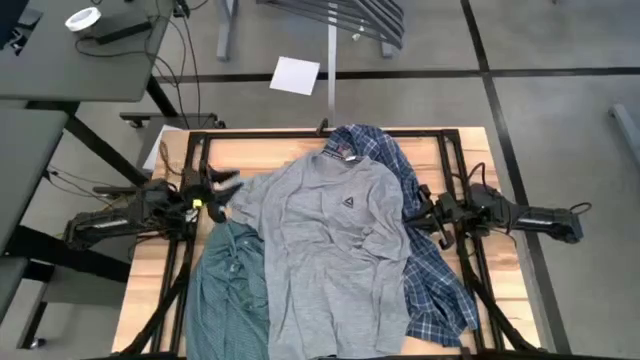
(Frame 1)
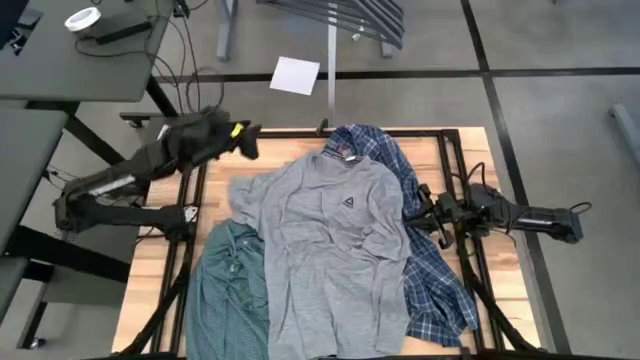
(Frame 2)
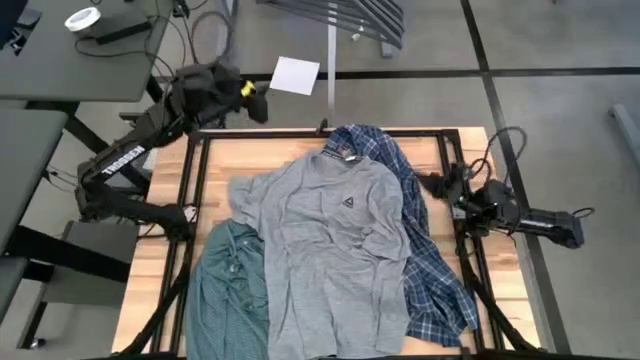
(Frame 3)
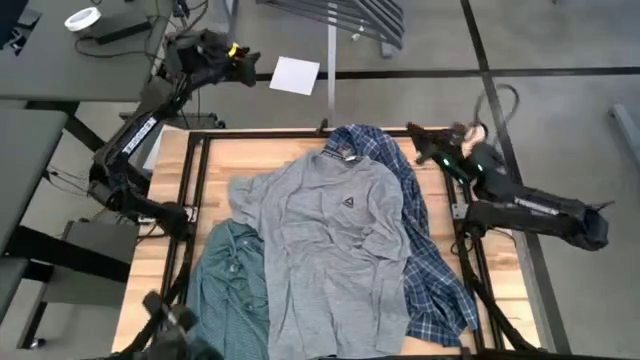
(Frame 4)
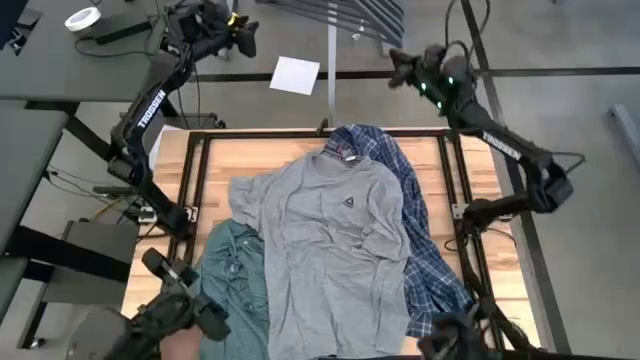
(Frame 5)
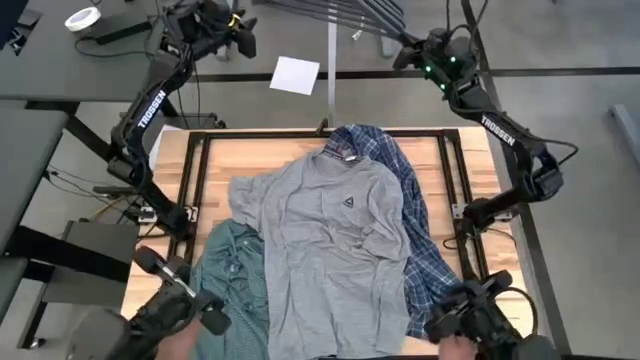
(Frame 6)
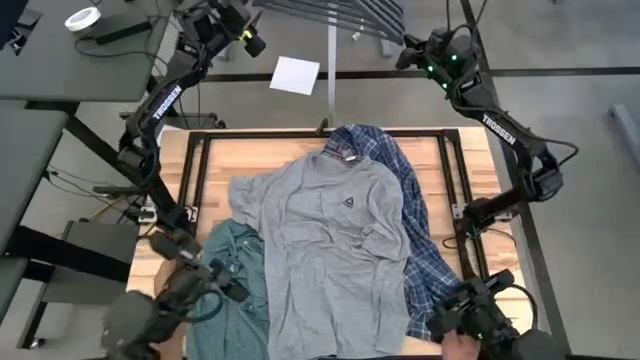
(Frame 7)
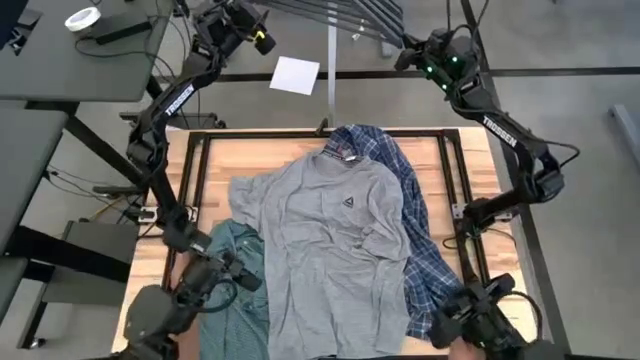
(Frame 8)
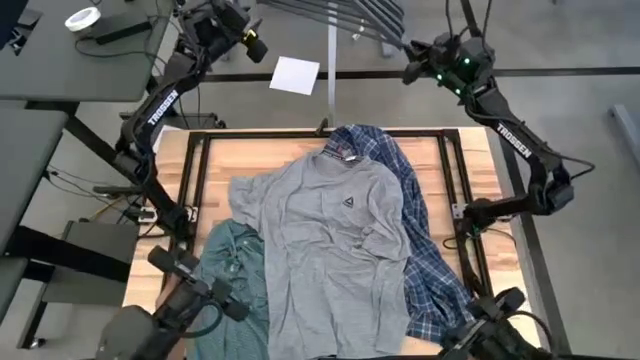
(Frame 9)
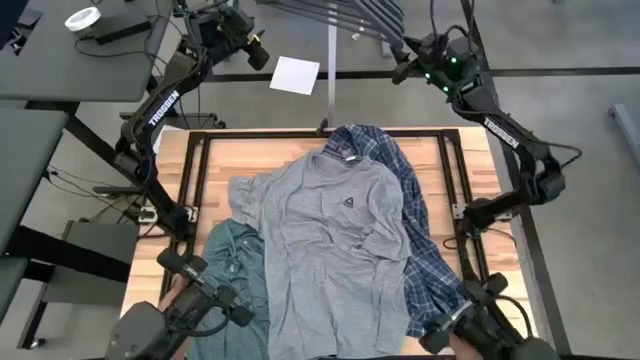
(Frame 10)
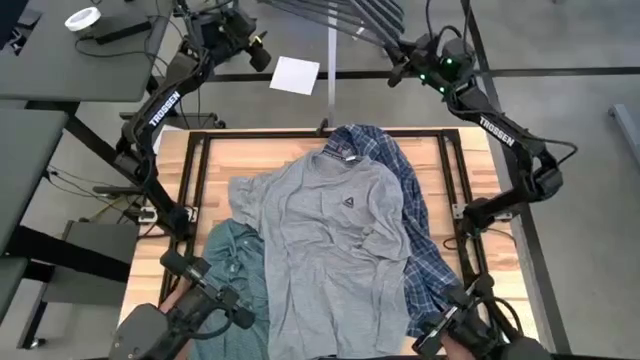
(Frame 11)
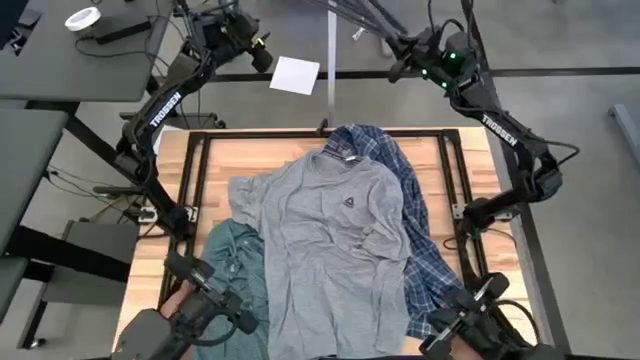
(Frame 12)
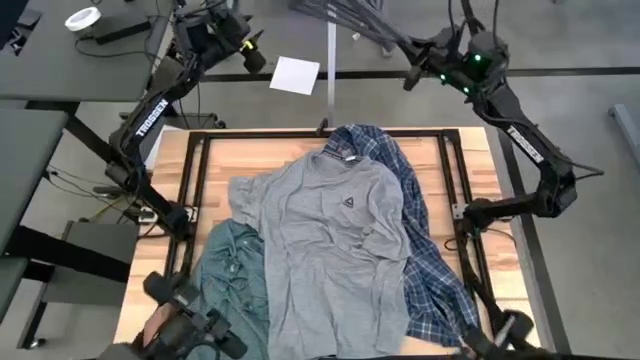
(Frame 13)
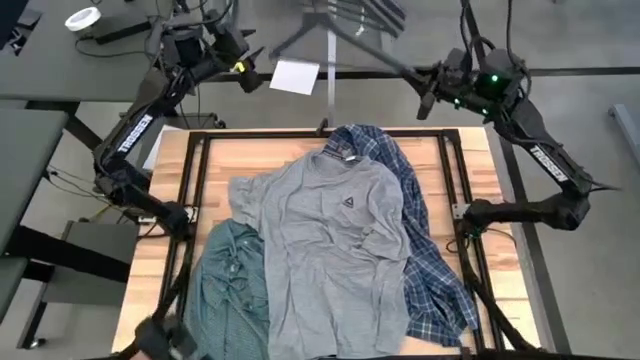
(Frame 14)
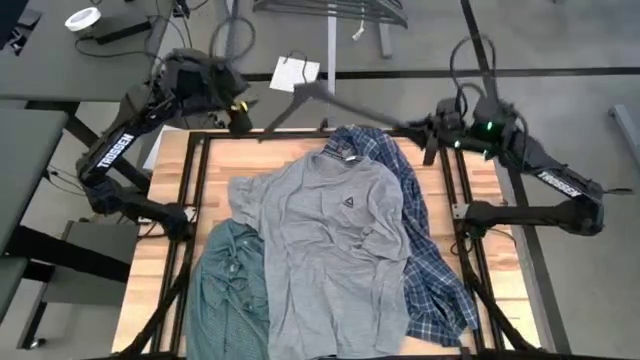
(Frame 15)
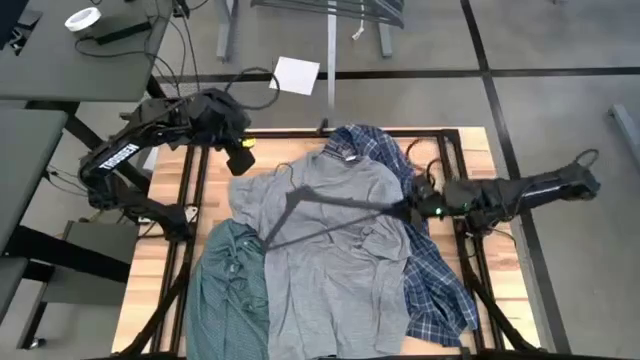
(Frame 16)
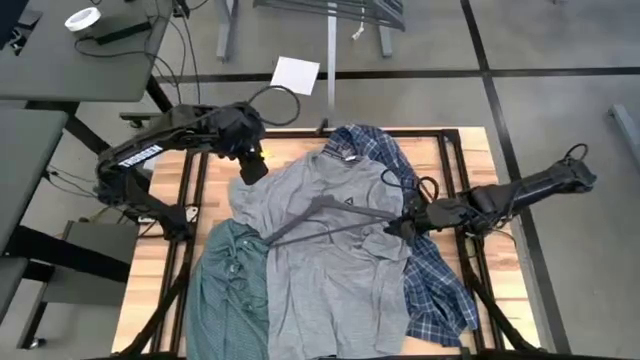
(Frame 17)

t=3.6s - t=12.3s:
Task: Hang clothes
Remove the gray hanger from the hanger rack

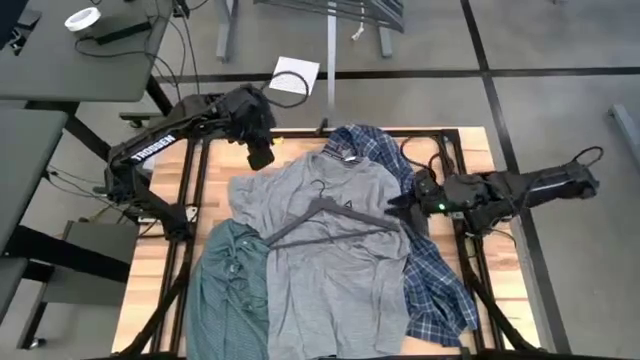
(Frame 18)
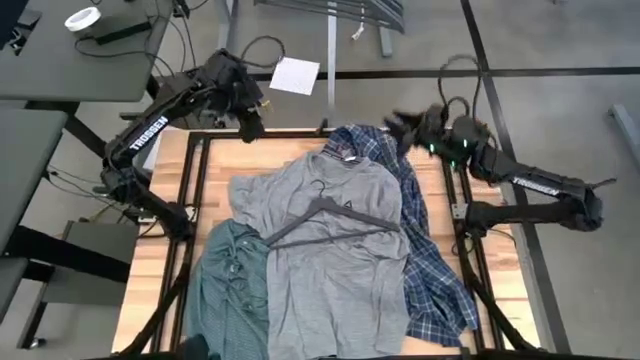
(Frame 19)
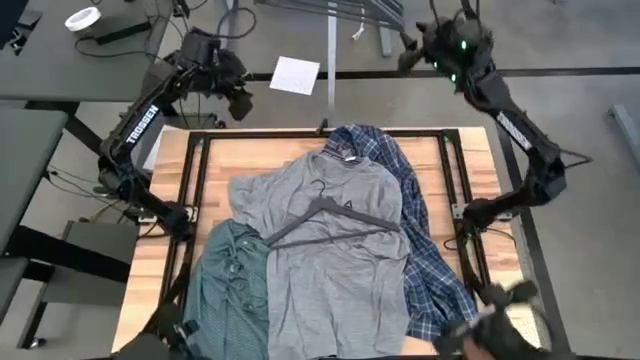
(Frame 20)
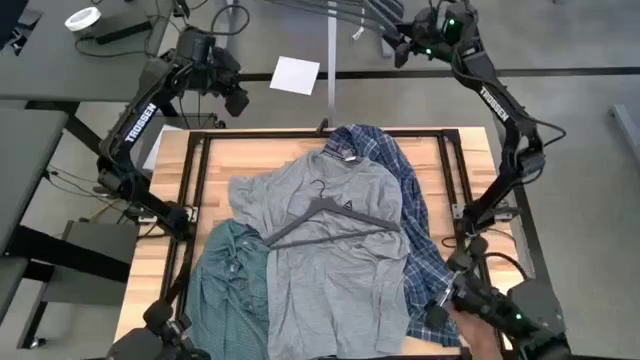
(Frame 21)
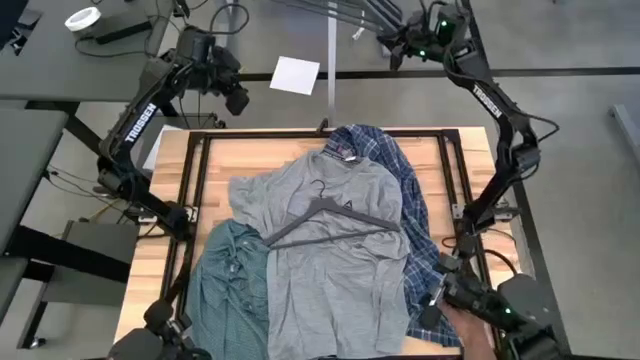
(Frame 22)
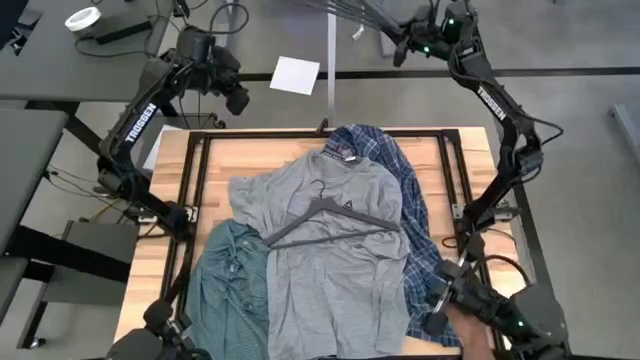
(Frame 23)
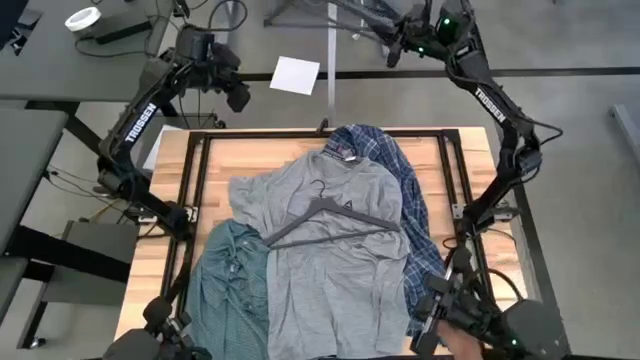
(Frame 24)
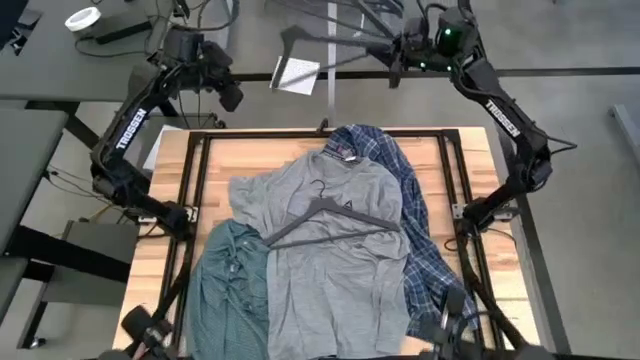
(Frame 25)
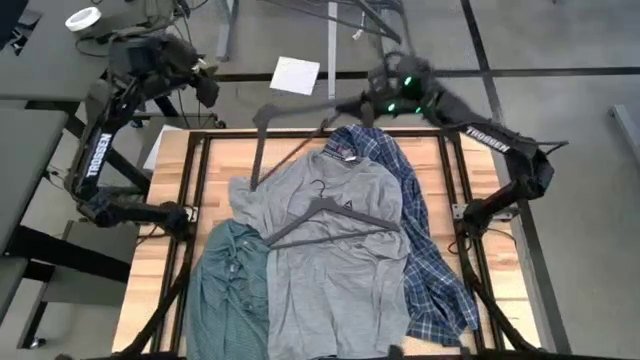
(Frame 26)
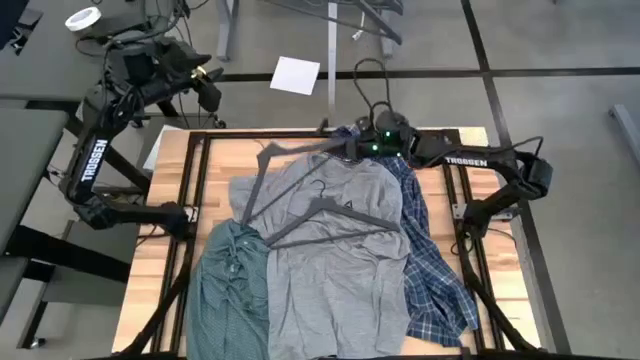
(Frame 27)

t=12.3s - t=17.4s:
Remove the gray hanger from the hanger rack

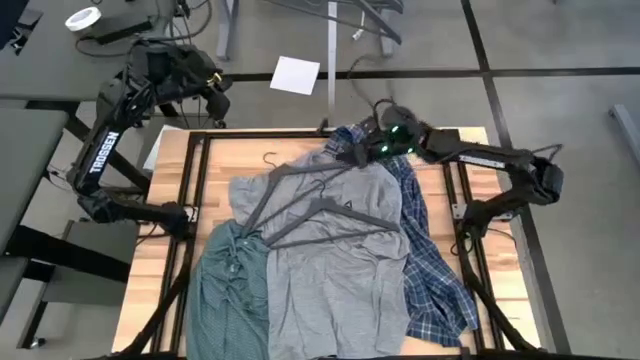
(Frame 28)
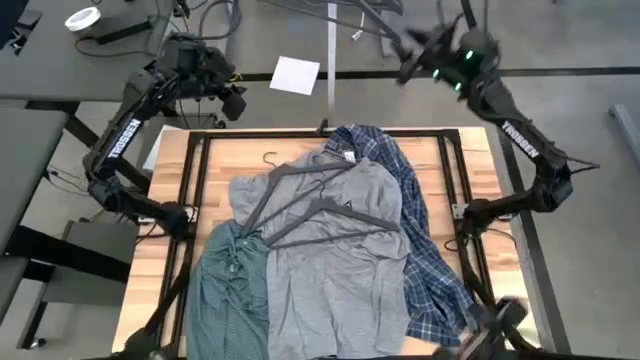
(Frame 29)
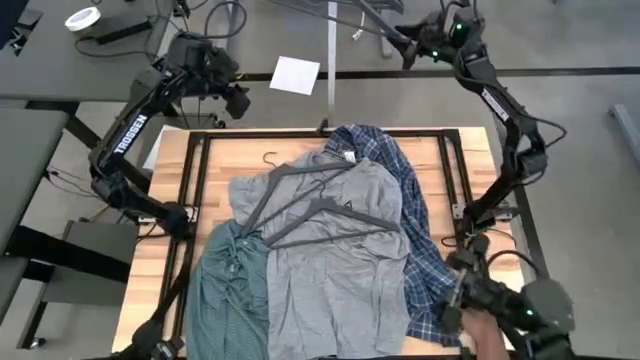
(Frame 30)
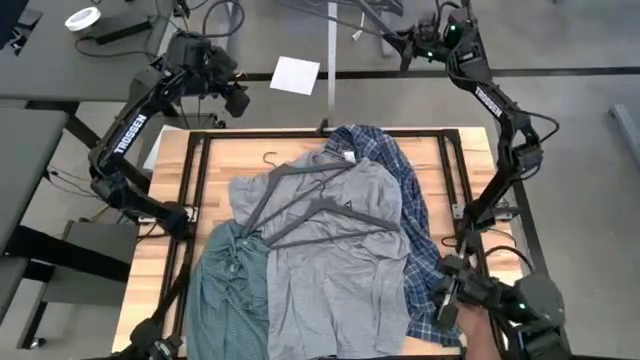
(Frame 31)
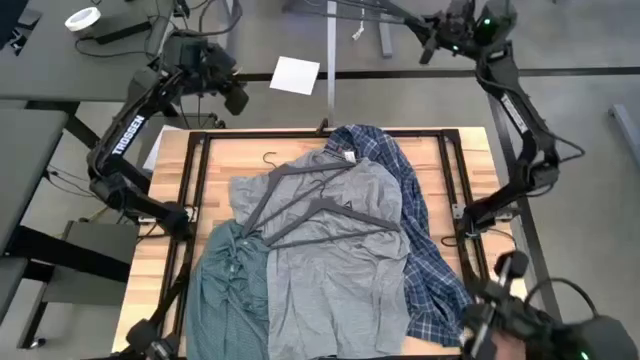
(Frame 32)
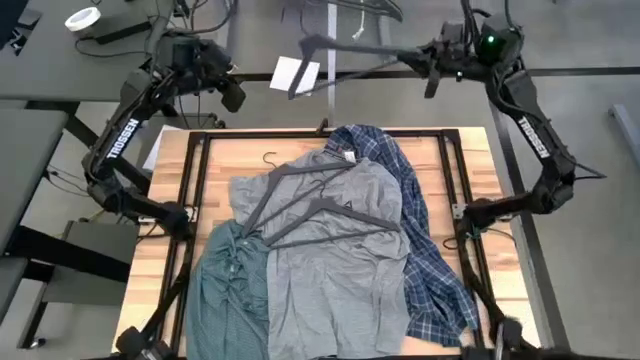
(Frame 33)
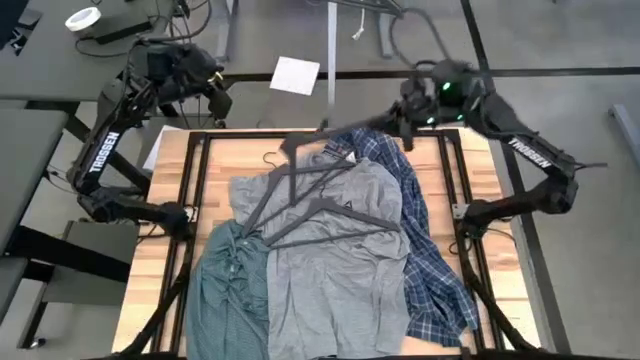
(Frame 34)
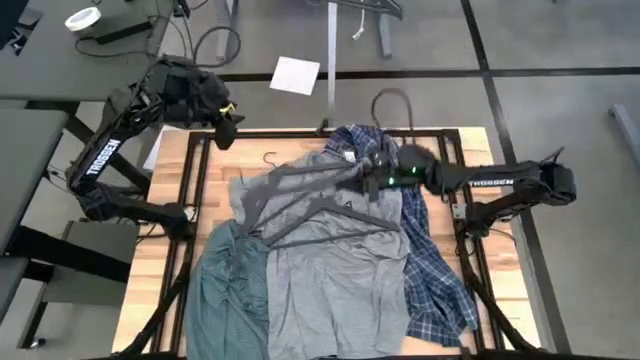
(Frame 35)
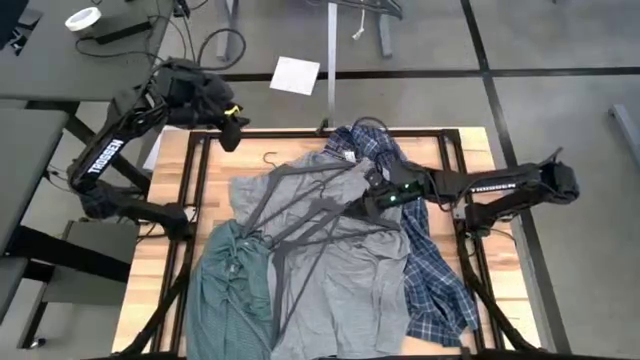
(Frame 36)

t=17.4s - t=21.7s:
Remove the gray hanger from the hanger rack

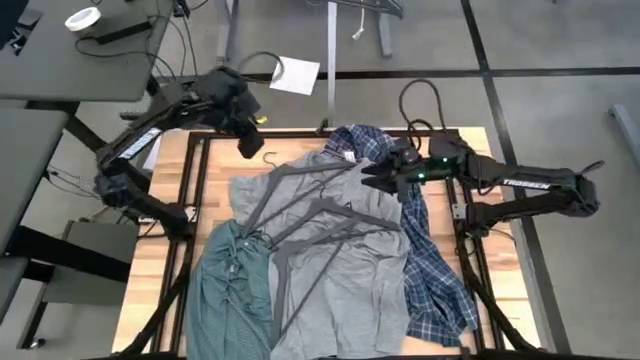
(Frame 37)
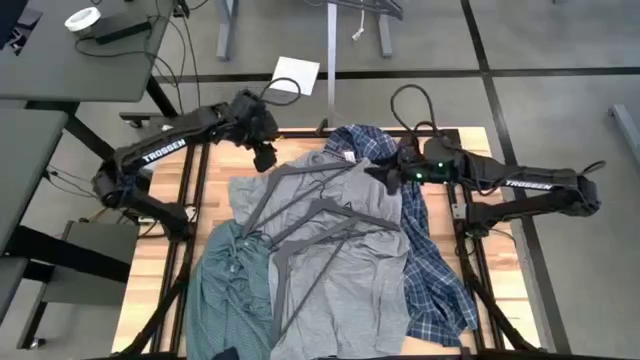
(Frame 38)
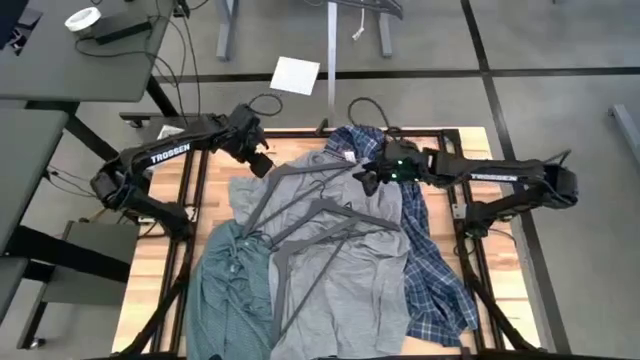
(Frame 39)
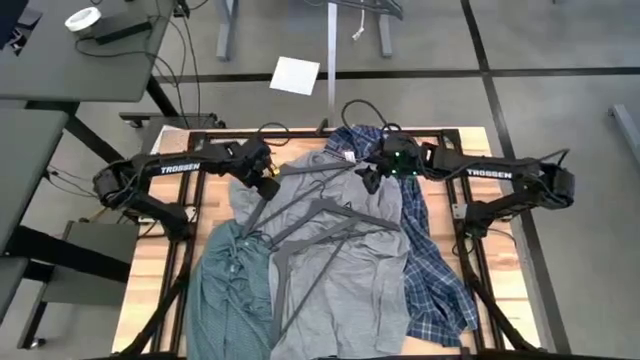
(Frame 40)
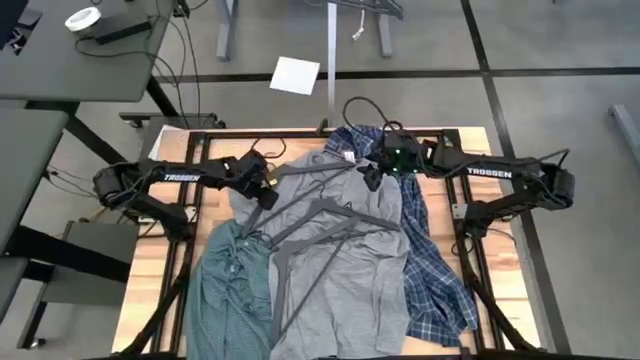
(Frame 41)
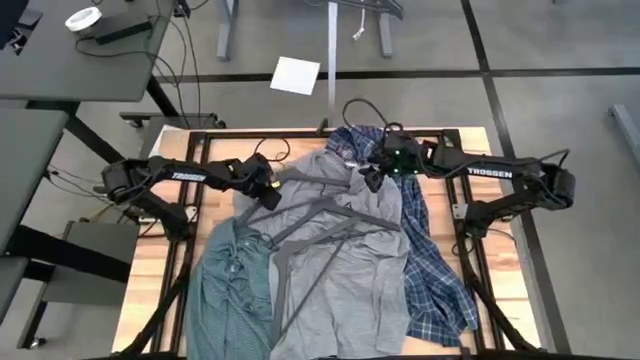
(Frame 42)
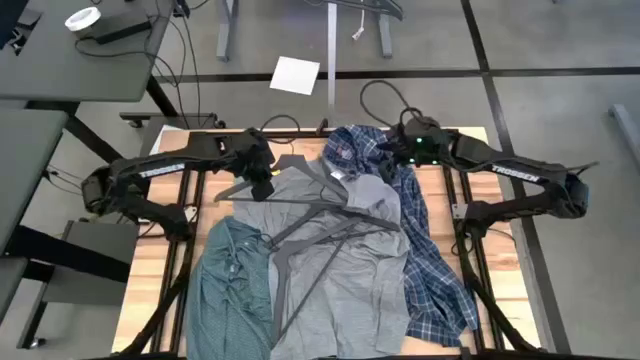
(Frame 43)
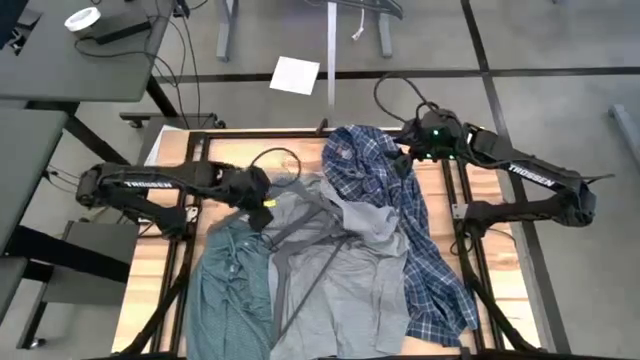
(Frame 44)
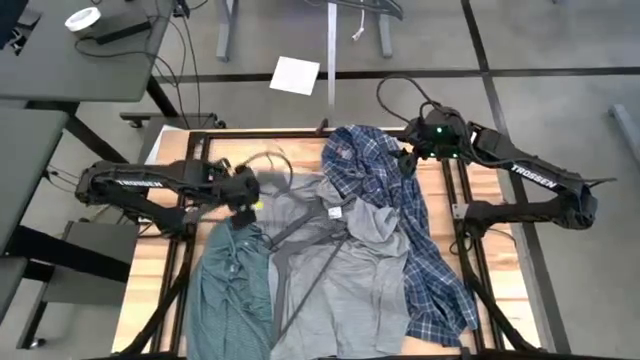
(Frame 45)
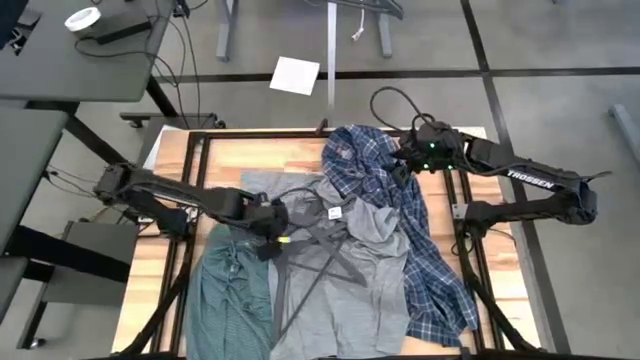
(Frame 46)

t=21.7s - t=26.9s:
Move the gray hanger to the center of the table
